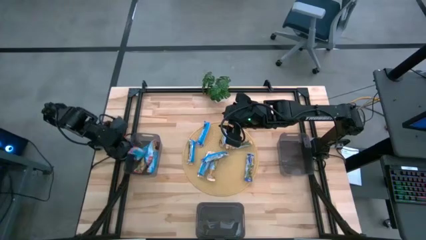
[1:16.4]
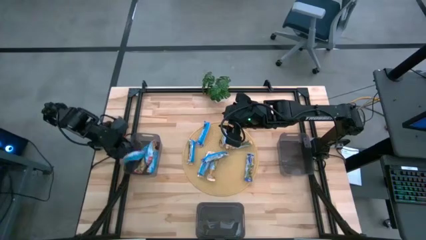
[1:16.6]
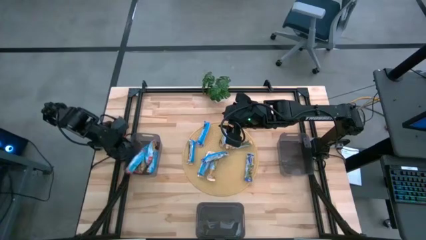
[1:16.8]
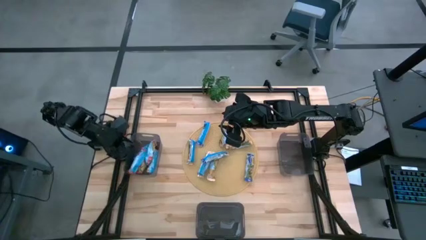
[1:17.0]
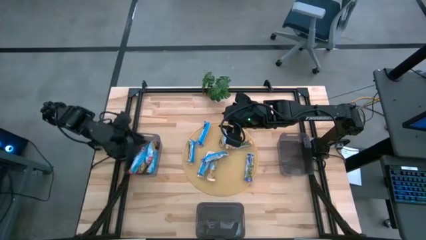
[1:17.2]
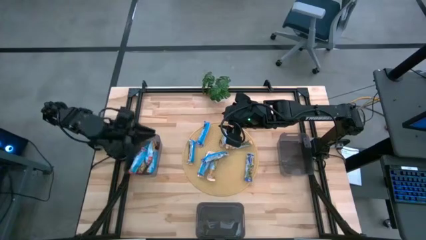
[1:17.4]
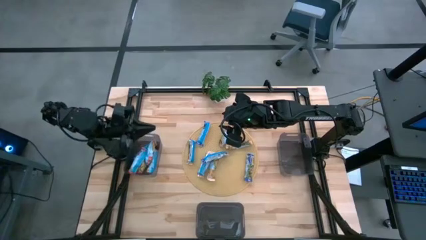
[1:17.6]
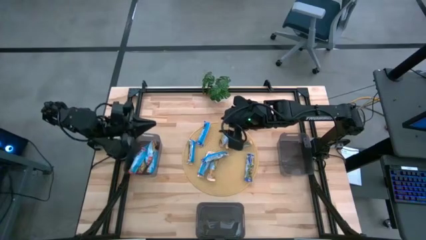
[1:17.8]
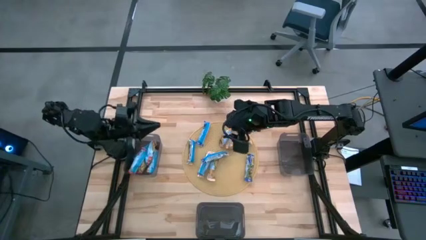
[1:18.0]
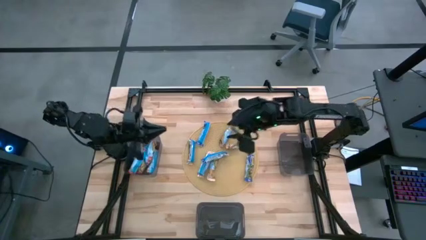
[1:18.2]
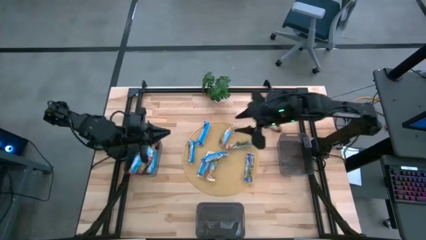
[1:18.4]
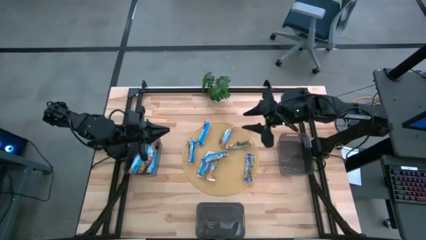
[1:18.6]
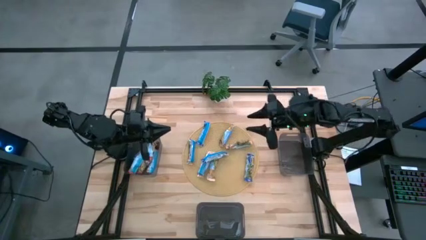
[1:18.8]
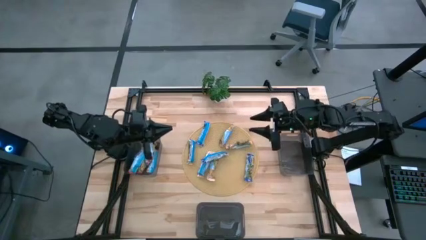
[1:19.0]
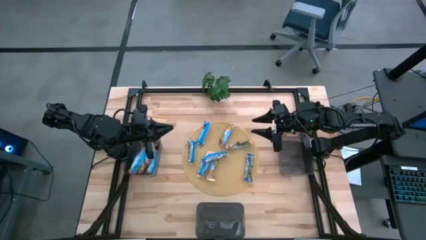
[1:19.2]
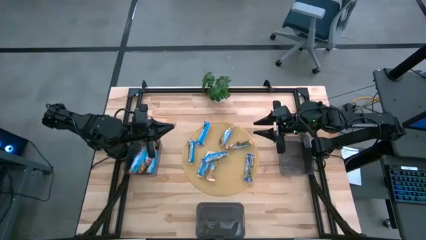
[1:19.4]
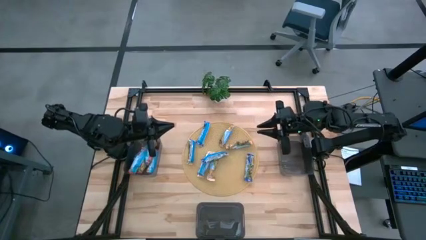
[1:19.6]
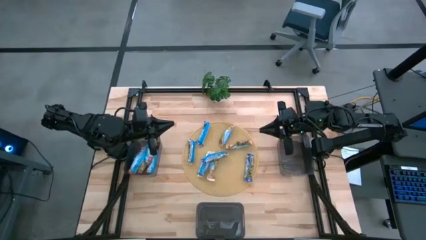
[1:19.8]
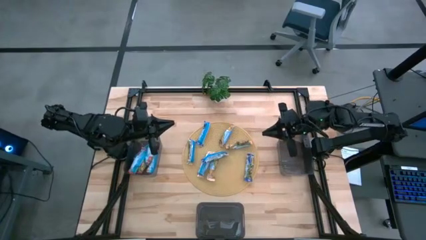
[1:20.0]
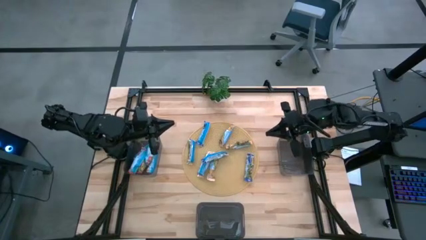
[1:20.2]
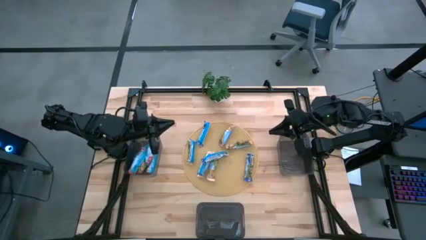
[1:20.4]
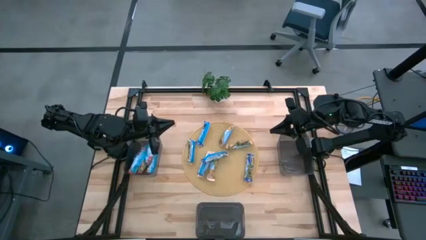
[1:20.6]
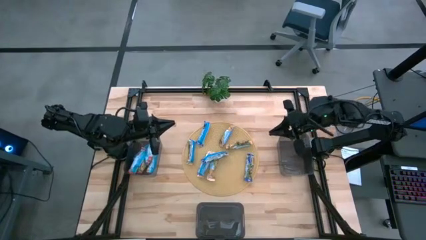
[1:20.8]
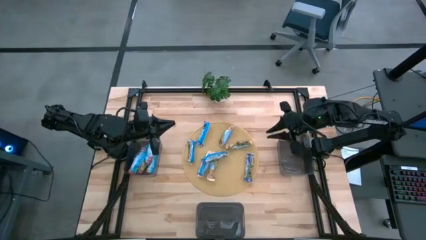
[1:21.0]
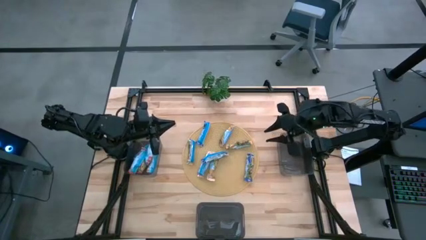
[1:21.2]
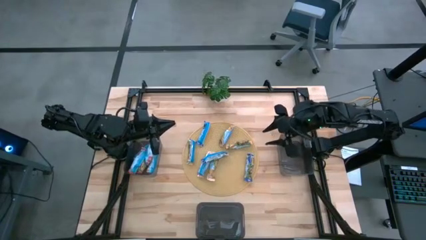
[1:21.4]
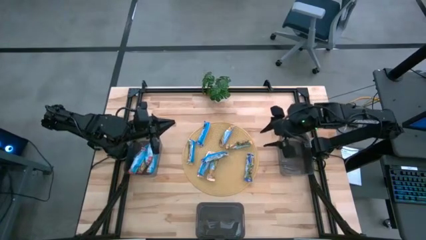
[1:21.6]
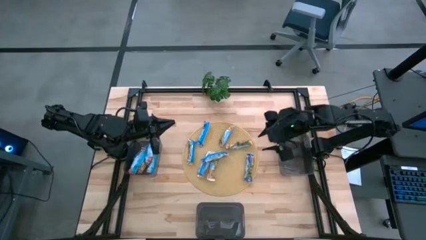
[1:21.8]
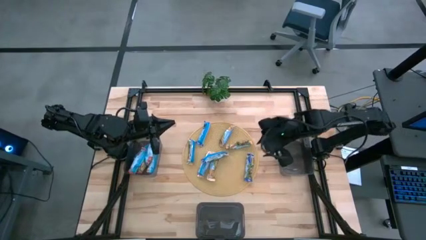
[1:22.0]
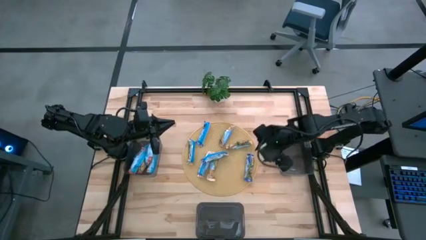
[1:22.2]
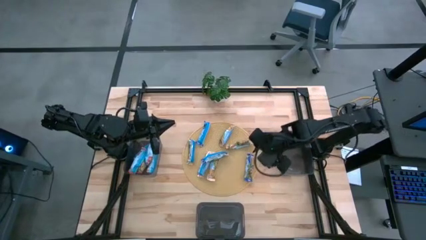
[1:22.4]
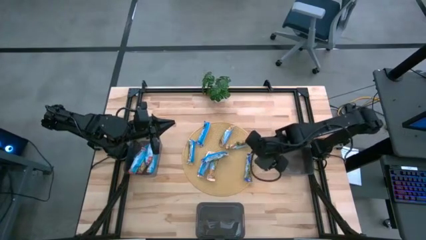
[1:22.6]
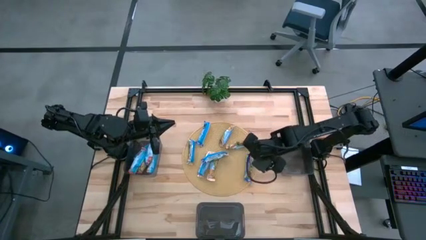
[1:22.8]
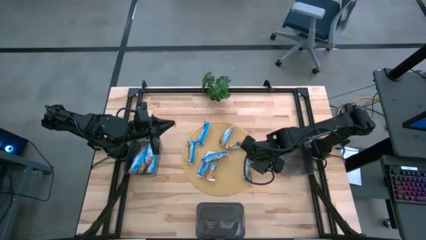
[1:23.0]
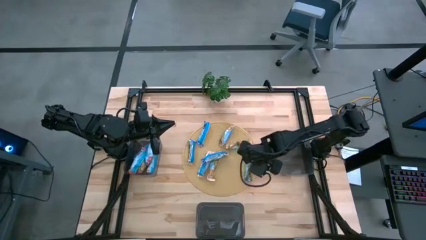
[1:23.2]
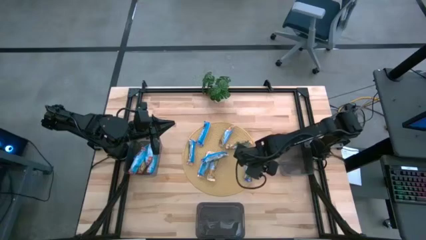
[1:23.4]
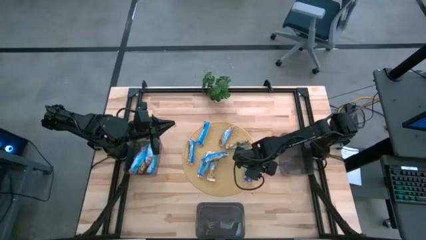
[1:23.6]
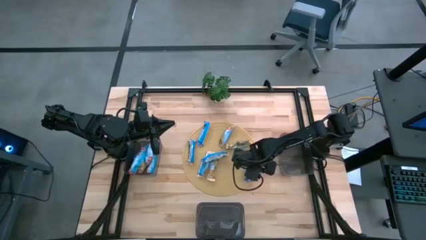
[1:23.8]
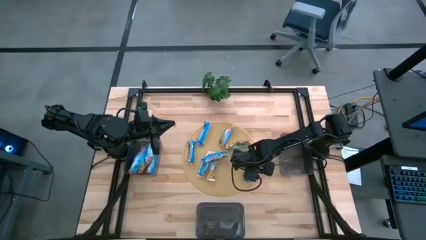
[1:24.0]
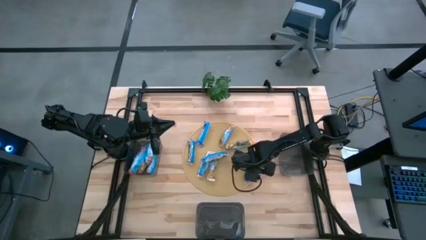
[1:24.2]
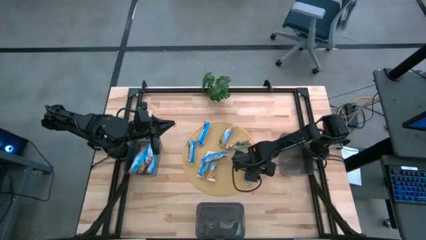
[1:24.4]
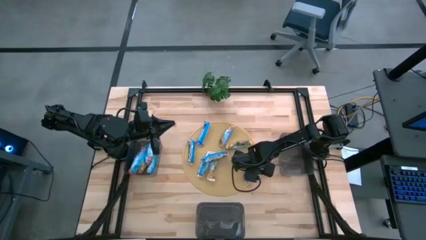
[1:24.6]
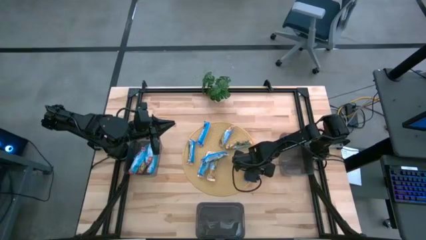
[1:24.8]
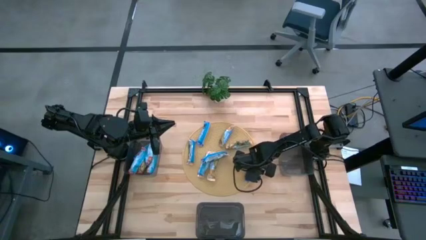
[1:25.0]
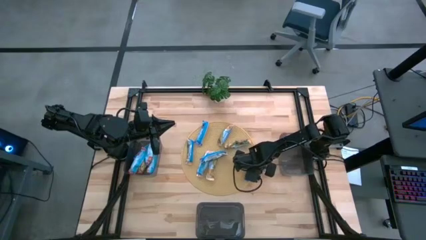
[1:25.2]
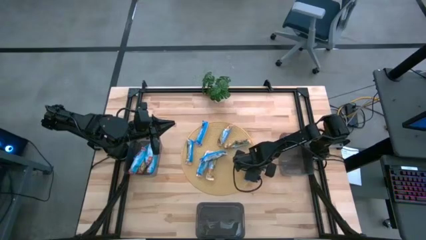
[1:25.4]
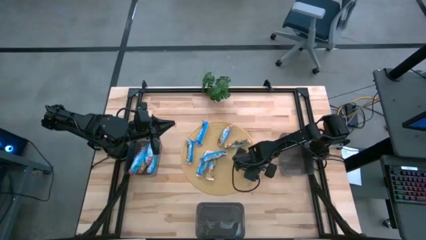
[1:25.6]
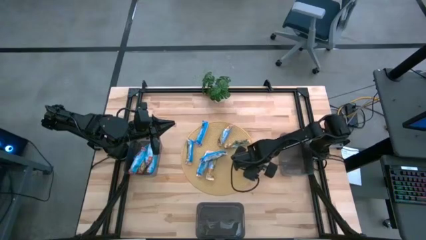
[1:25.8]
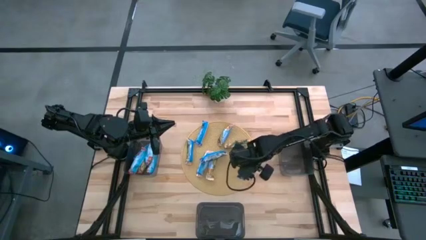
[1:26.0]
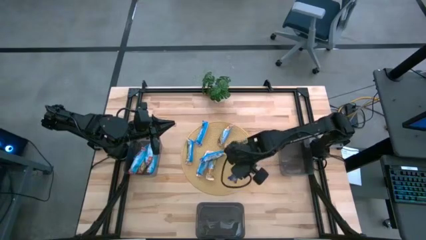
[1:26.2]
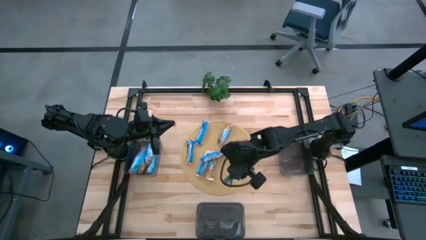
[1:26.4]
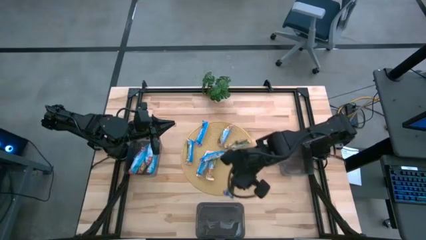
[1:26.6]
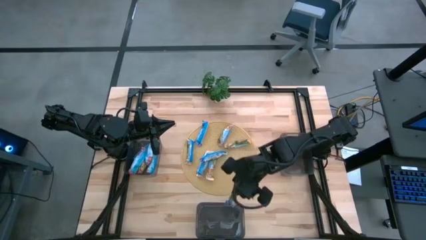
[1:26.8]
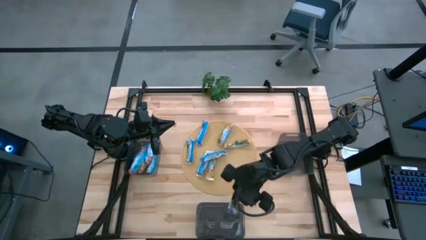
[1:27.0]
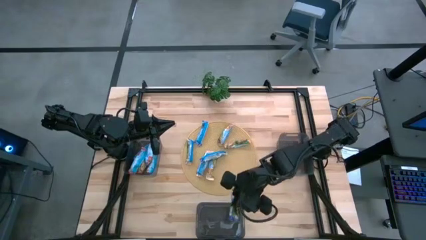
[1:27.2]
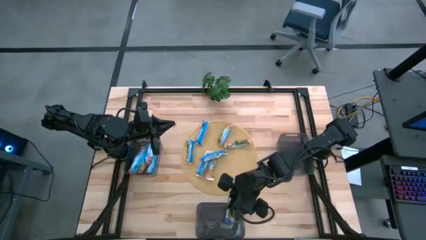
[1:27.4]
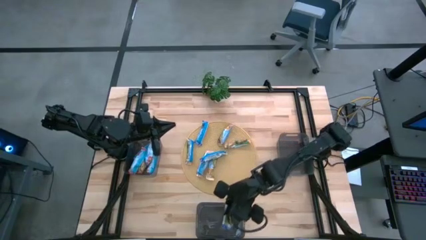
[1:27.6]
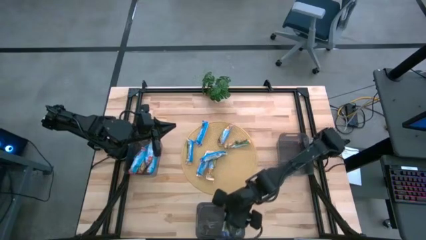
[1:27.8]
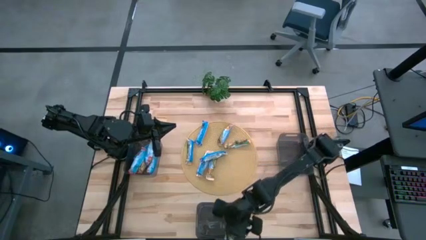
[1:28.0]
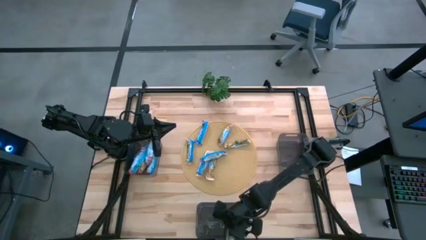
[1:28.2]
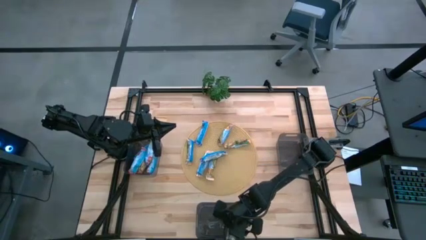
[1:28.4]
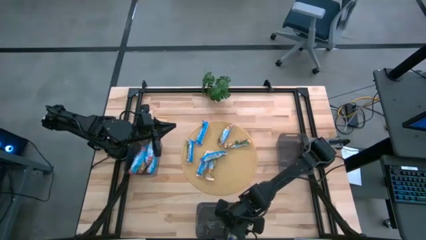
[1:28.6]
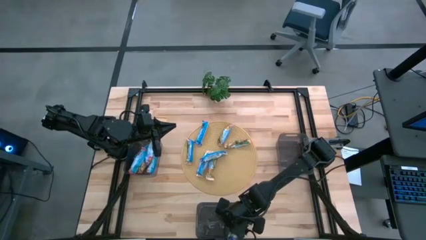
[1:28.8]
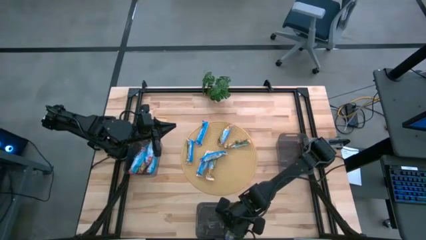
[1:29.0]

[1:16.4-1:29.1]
Task: Pick and place Granola Bars by type
Put the bottom right blue granola bar into the bottom bin
